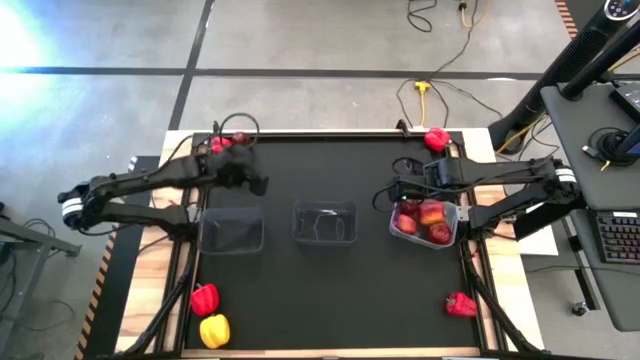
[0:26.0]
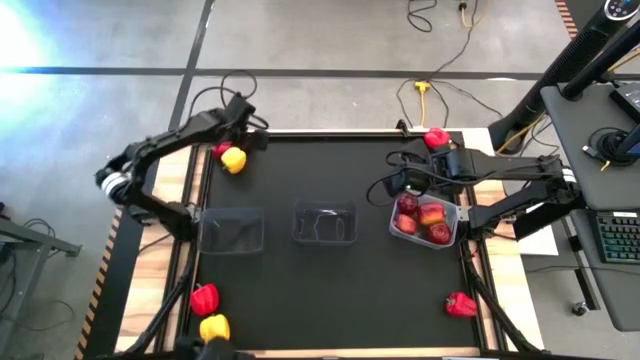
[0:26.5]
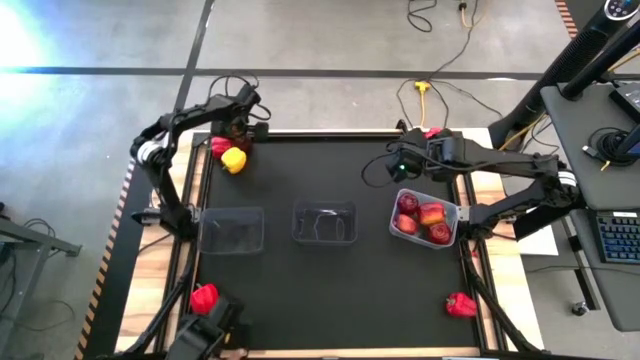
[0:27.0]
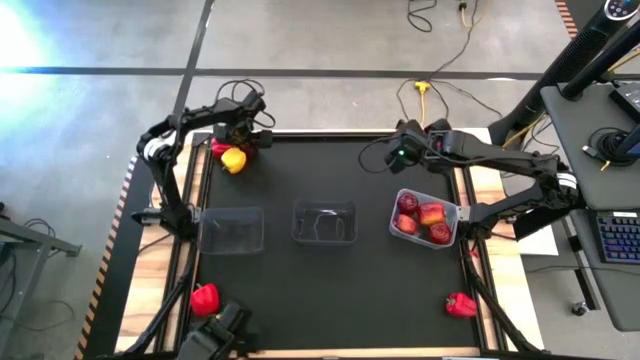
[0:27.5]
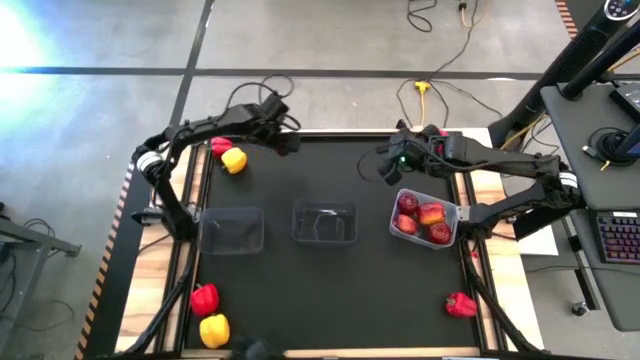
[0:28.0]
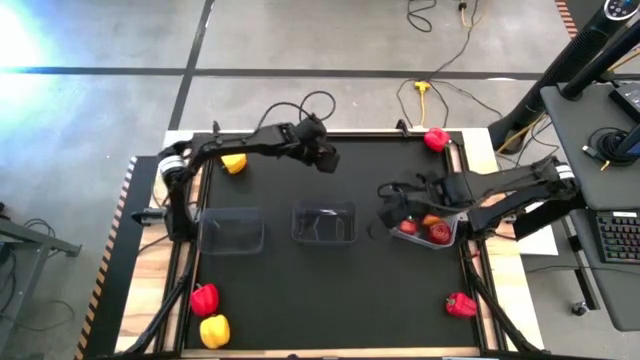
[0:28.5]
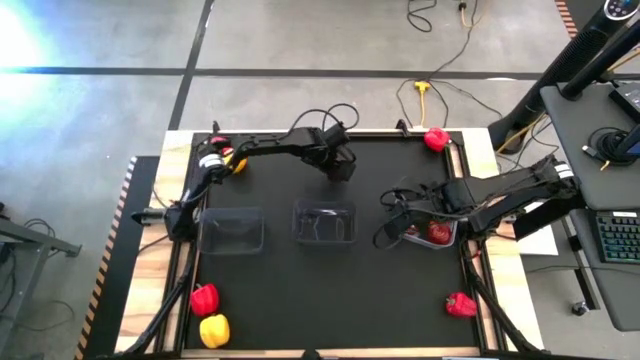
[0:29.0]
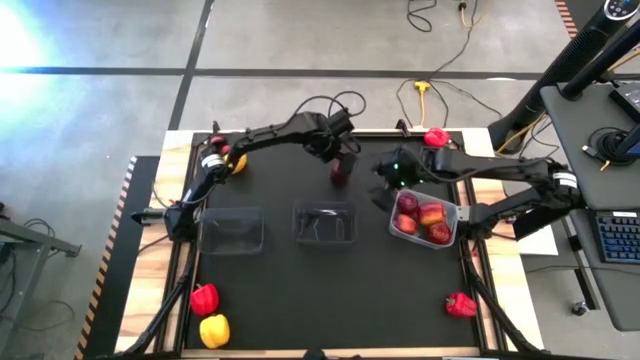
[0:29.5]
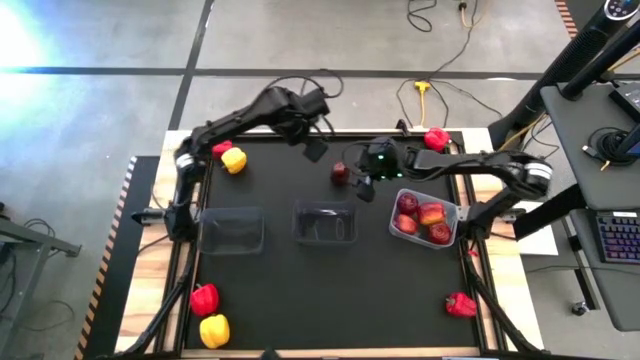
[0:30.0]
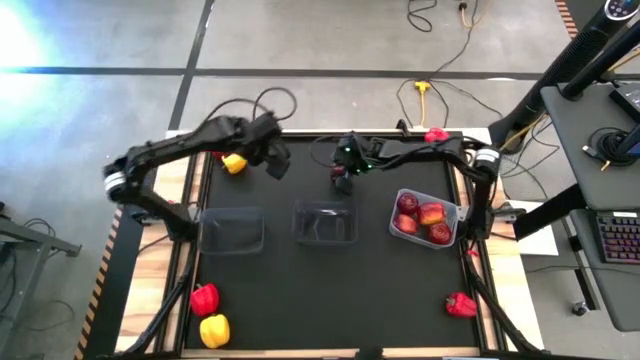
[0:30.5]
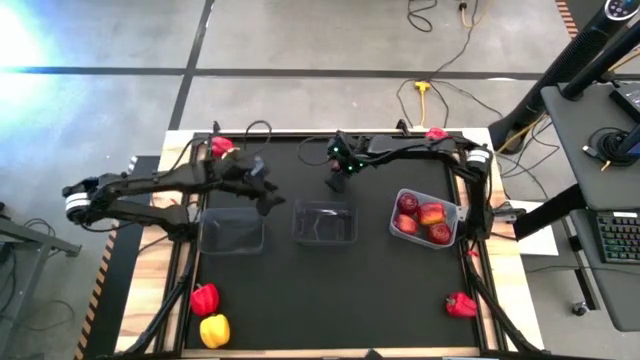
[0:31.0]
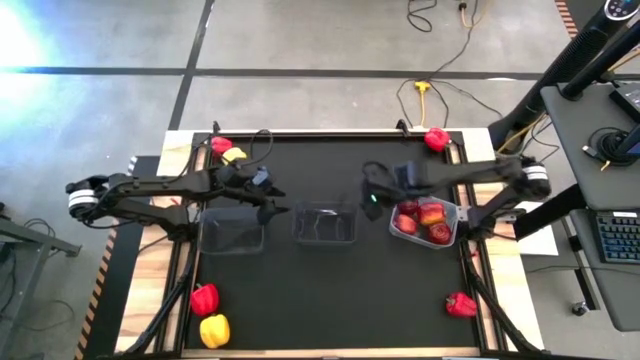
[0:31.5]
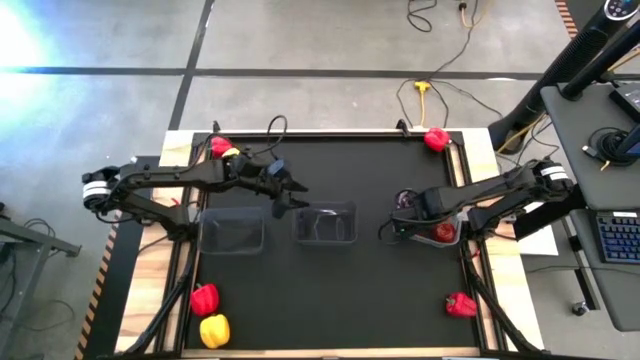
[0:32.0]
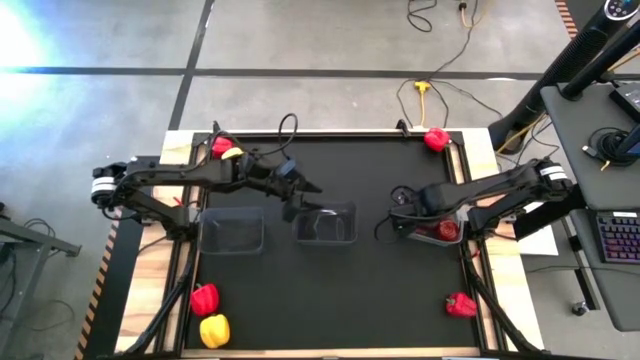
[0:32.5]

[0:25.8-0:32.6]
Task: Sort produce into baskets
Put the red apple into the transparent bin

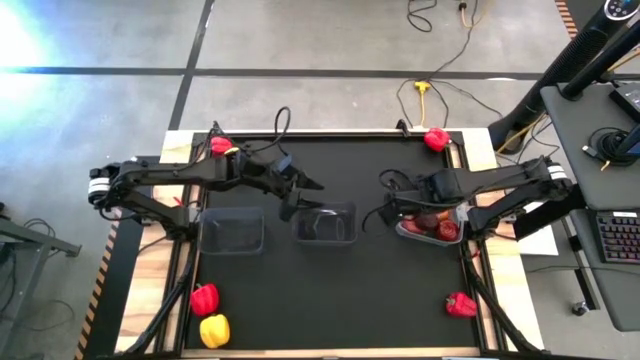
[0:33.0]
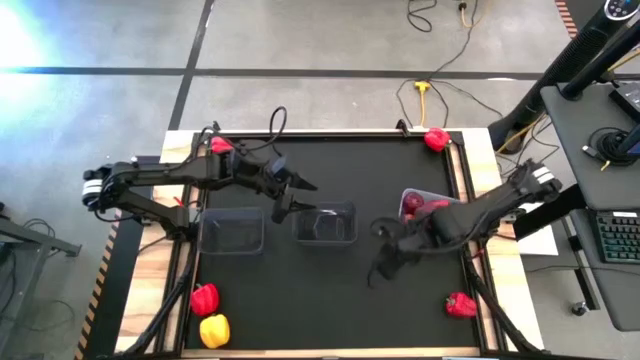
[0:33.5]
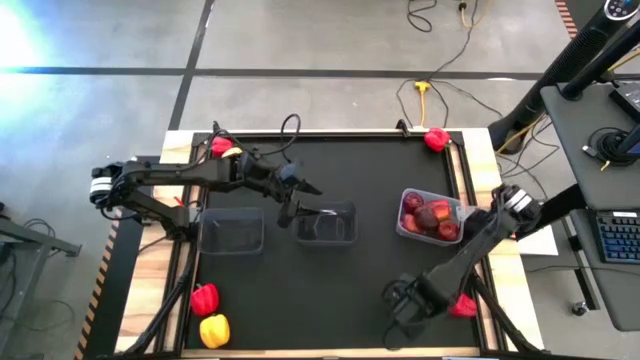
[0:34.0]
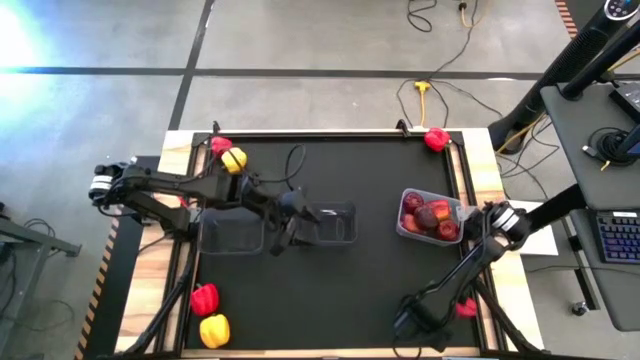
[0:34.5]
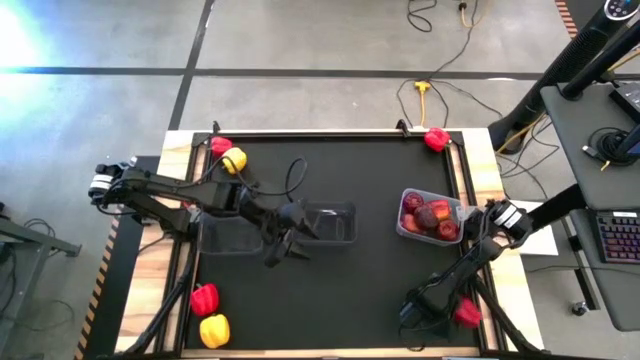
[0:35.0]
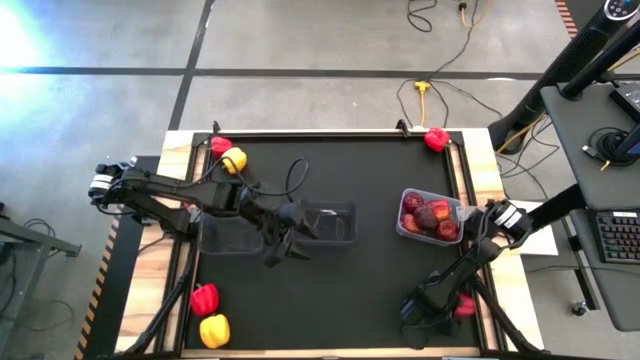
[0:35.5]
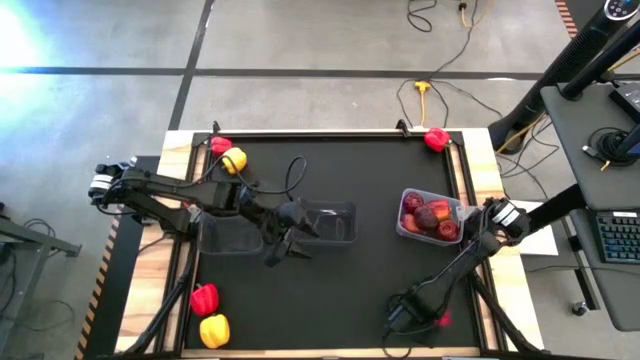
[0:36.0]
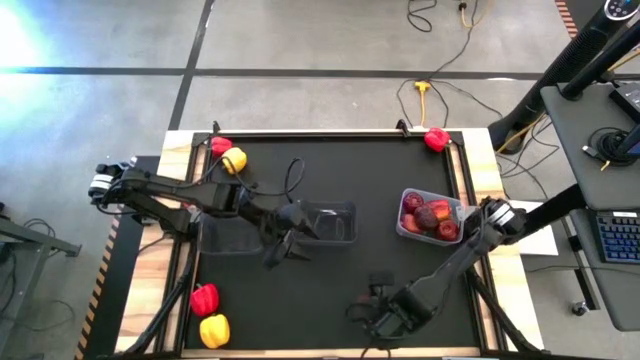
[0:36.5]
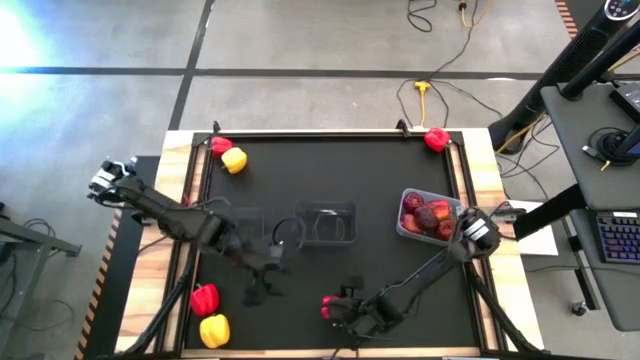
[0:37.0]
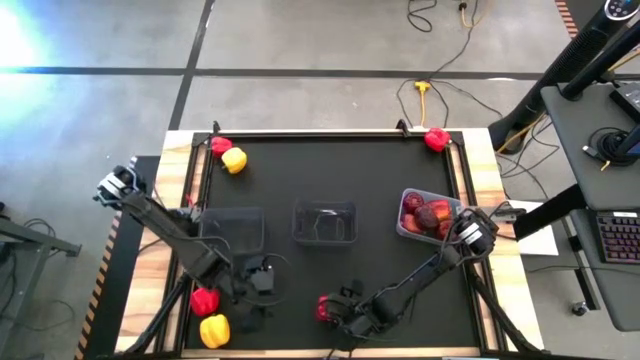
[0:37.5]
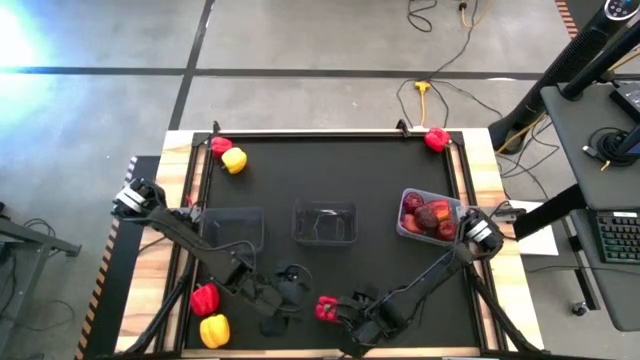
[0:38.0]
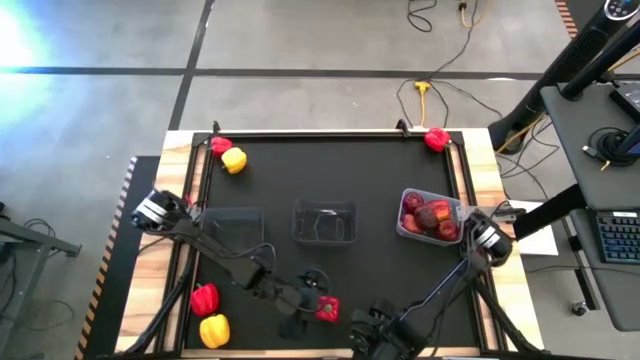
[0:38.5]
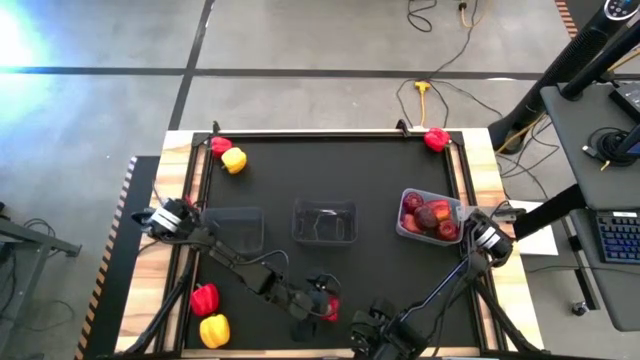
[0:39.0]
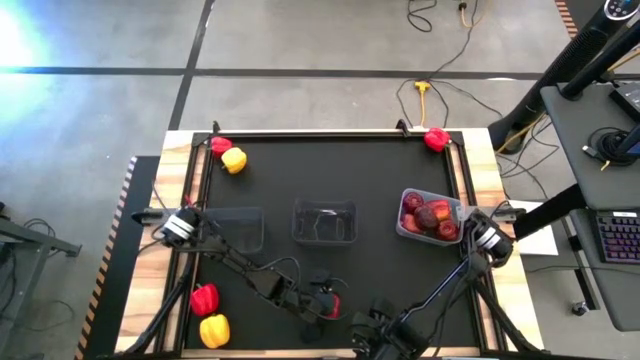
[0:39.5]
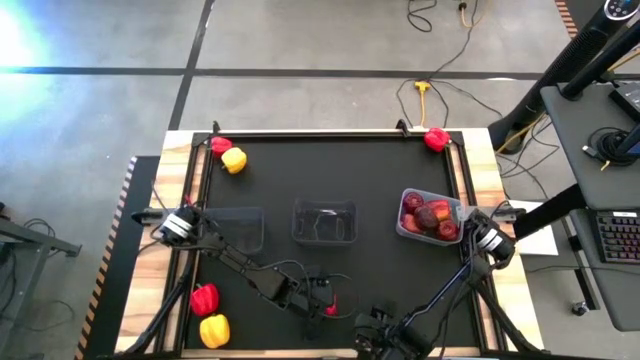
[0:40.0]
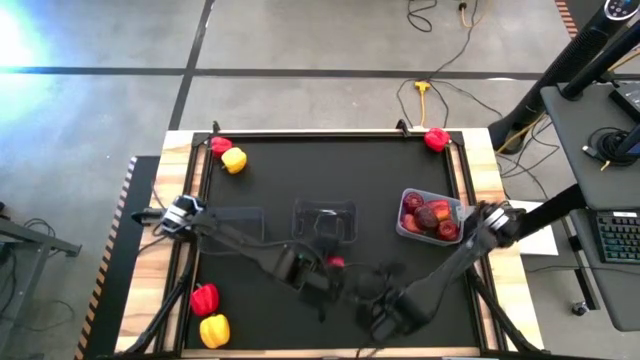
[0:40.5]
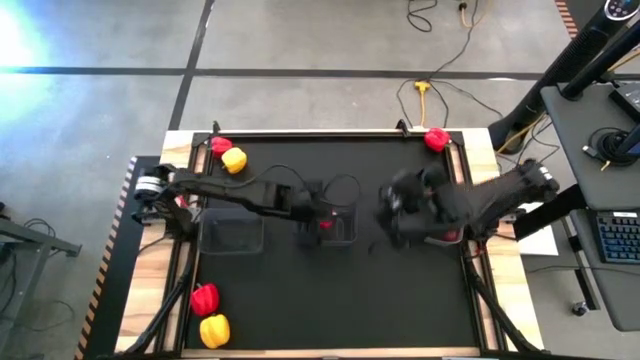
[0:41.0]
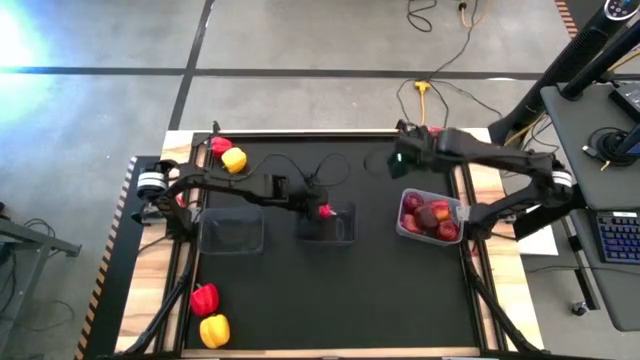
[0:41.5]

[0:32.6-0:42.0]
Put the red bell pepper into the right black bin

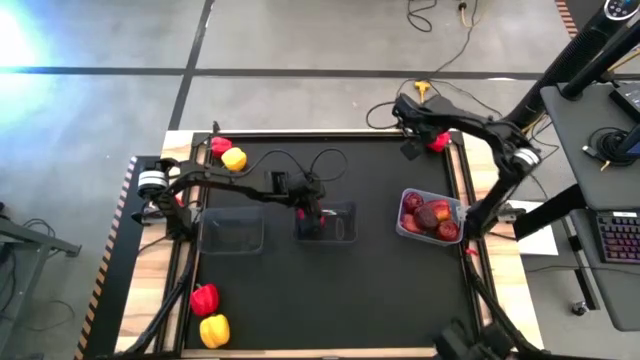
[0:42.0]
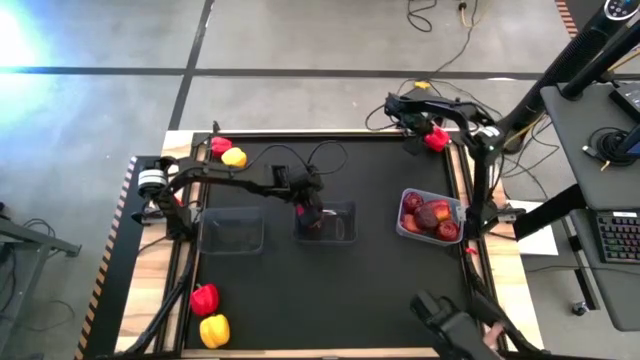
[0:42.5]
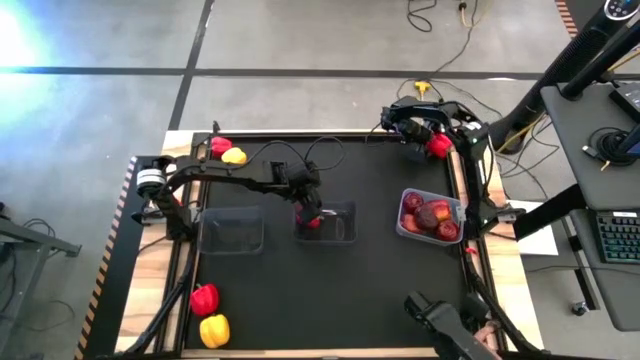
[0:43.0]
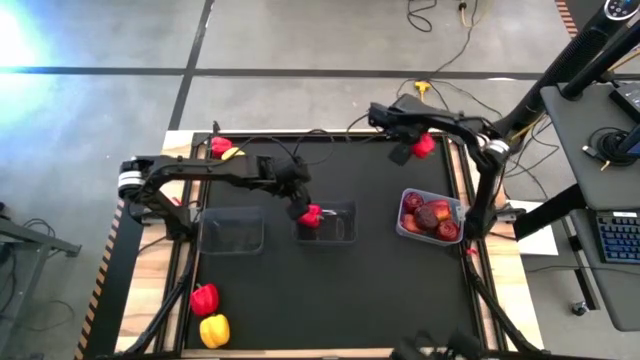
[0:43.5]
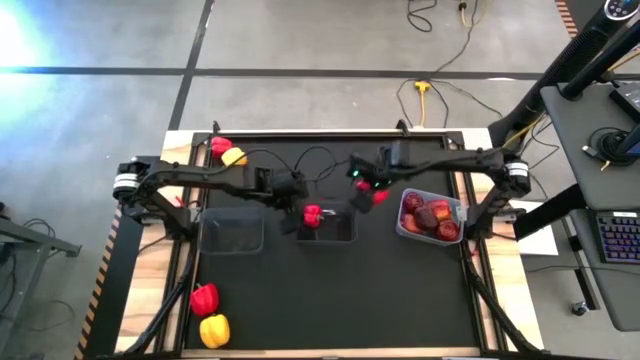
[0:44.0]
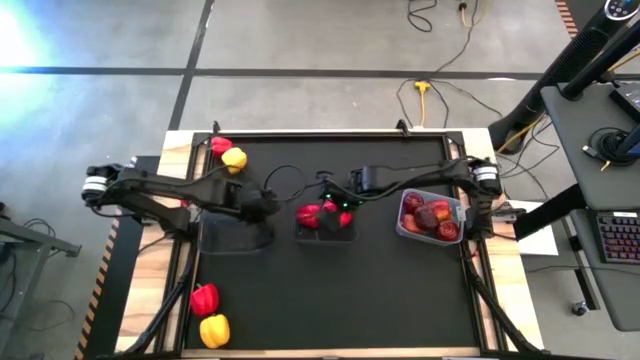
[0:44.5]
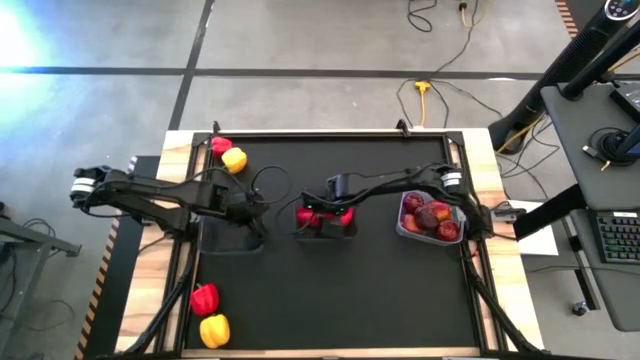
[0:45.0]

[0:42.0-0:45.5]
Put the red bell pepper into the right black bin

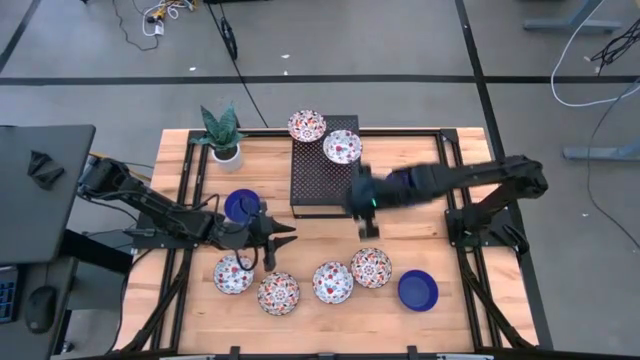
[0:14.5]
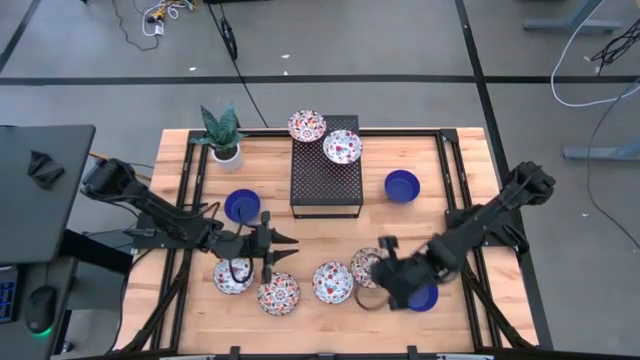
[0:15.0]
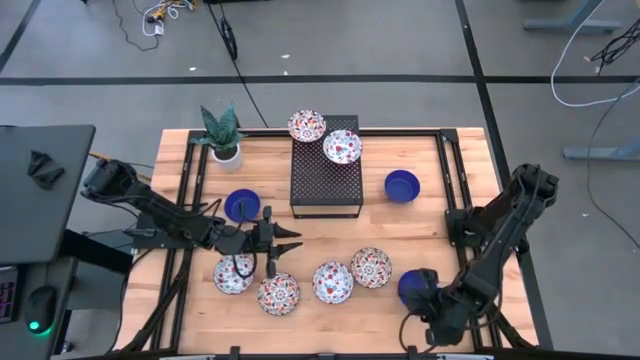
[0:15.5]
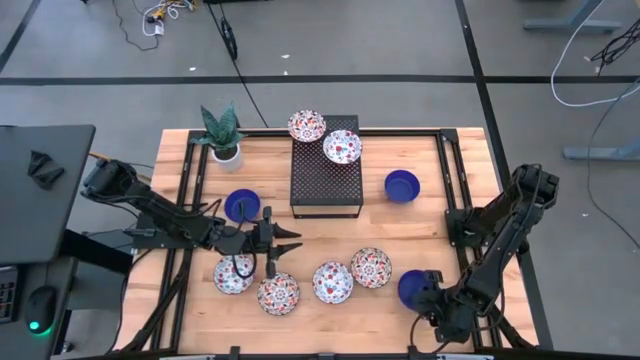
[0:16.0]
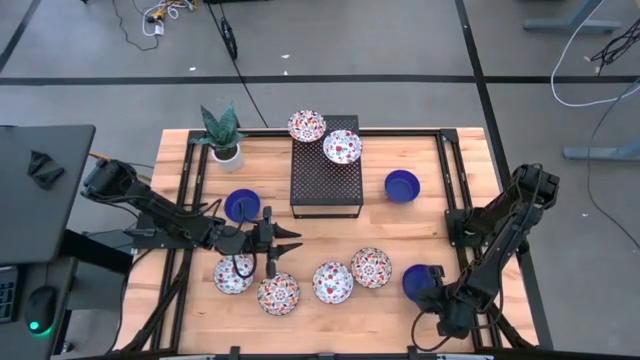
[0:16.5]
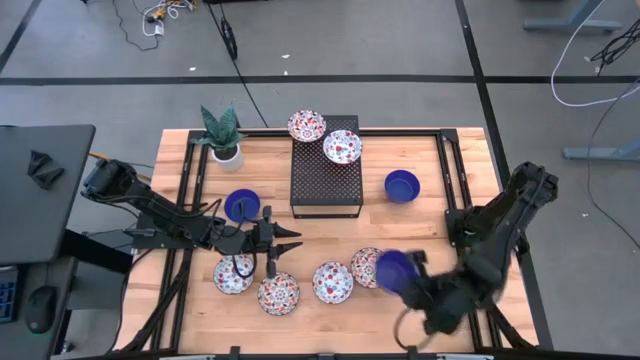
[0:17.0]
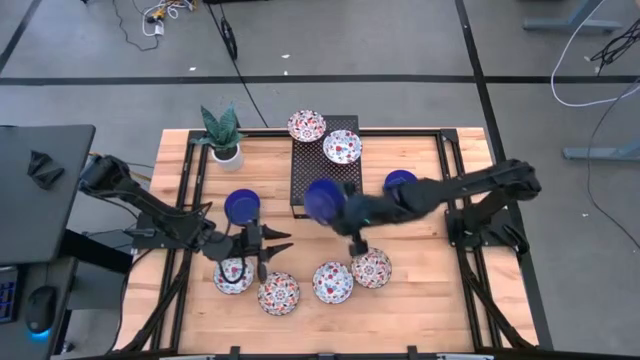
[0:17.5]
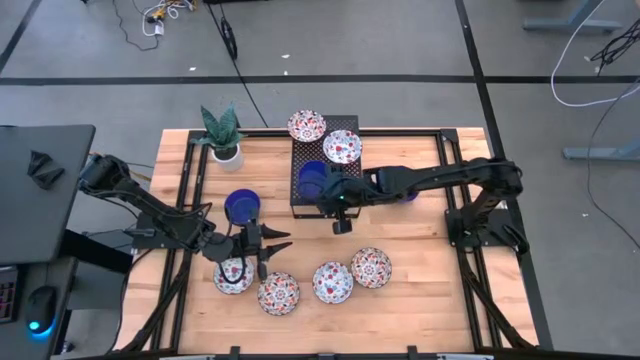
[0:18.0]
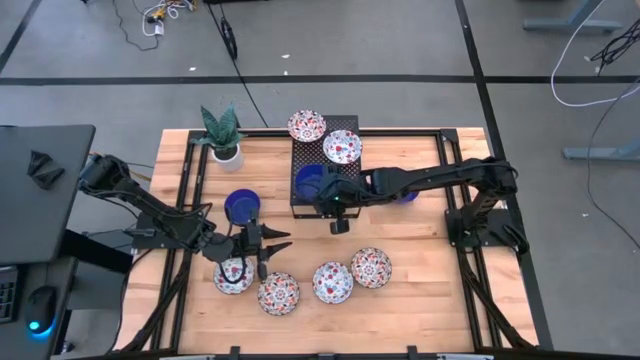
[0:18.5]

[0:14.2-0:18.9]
Task: Pick & Place Mini bowls
Put the bottom blue bowl on the shelf
